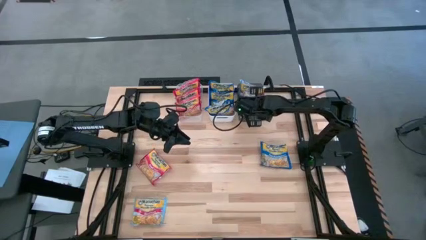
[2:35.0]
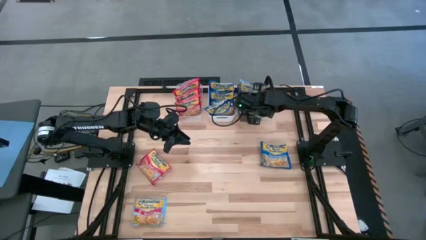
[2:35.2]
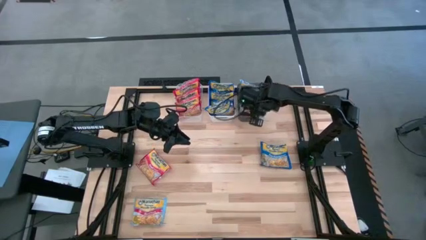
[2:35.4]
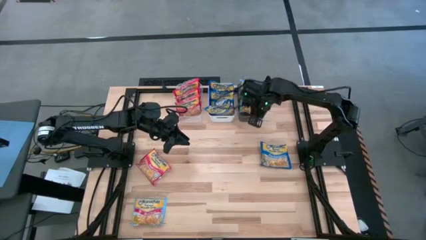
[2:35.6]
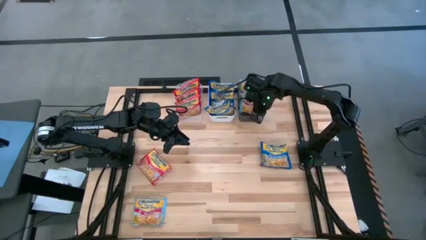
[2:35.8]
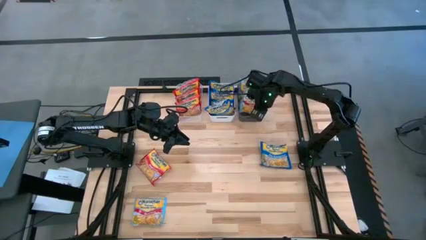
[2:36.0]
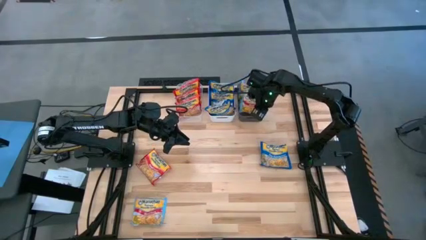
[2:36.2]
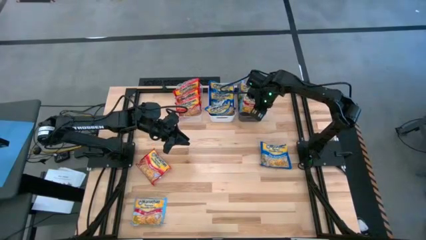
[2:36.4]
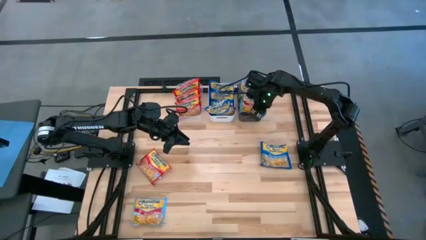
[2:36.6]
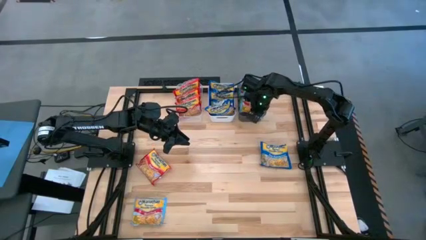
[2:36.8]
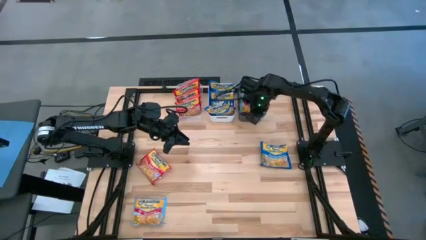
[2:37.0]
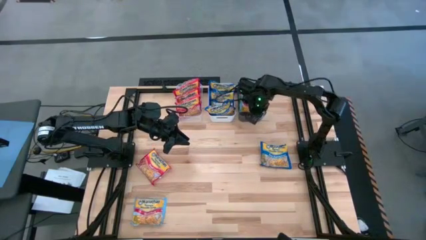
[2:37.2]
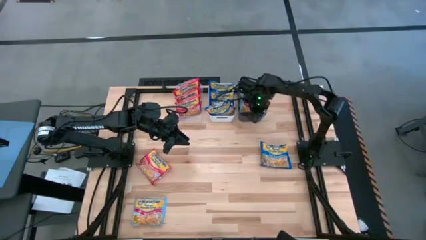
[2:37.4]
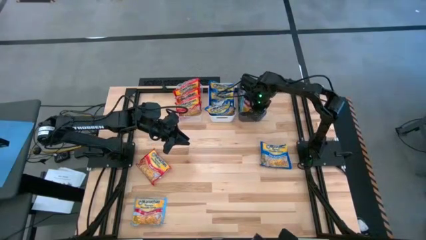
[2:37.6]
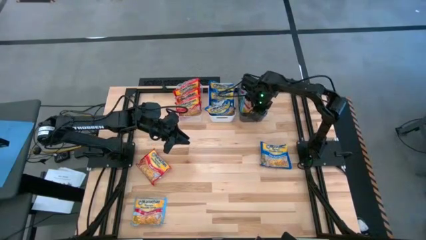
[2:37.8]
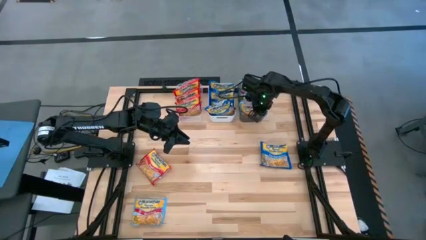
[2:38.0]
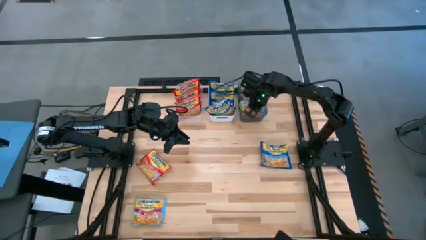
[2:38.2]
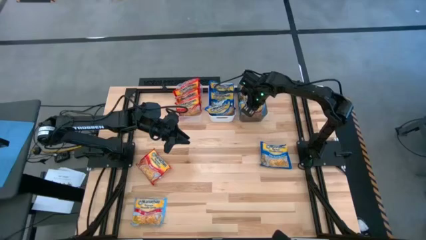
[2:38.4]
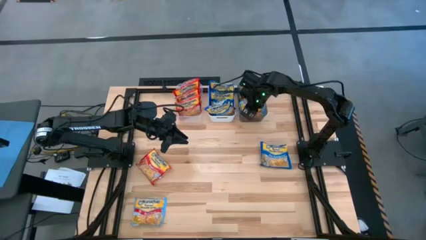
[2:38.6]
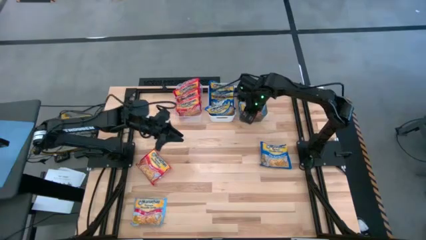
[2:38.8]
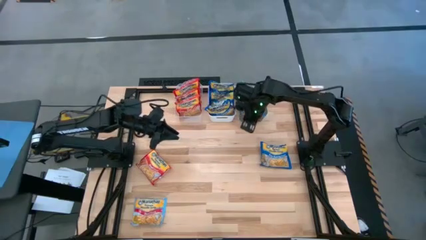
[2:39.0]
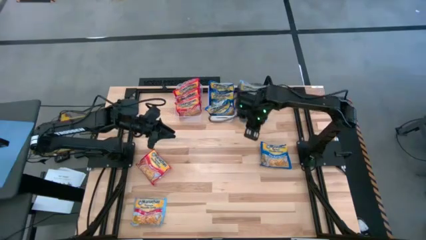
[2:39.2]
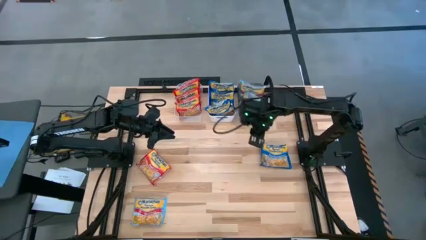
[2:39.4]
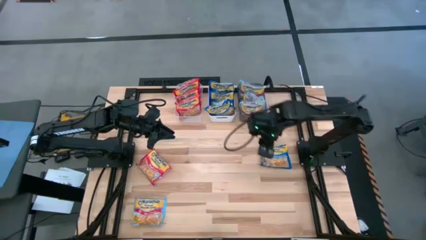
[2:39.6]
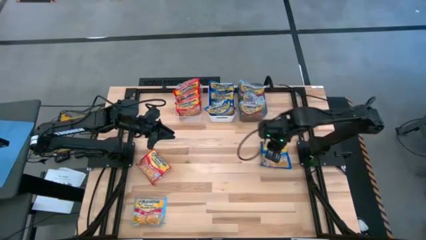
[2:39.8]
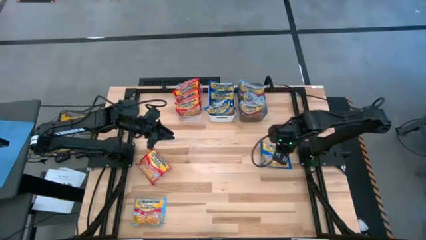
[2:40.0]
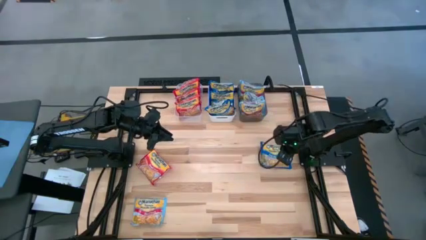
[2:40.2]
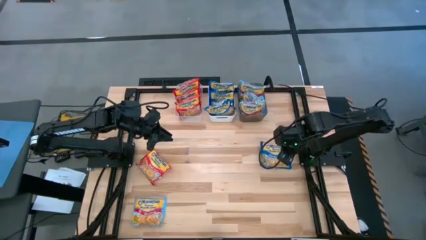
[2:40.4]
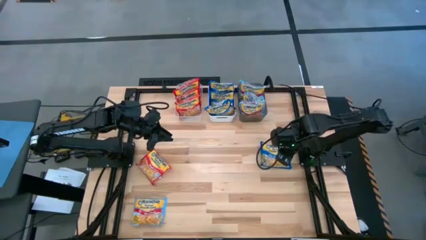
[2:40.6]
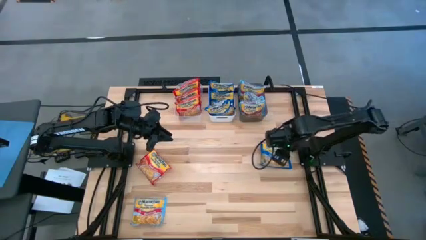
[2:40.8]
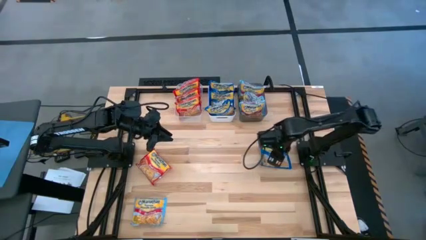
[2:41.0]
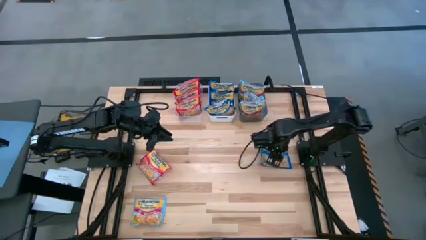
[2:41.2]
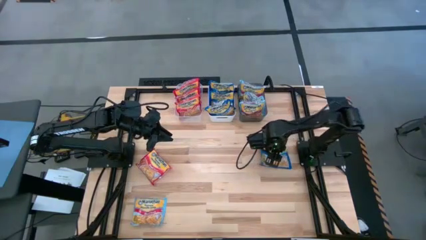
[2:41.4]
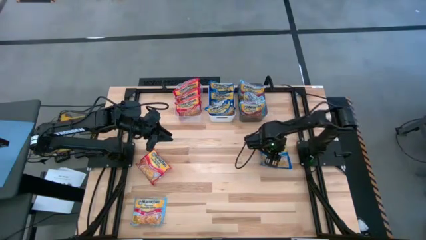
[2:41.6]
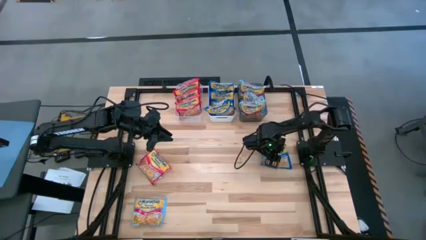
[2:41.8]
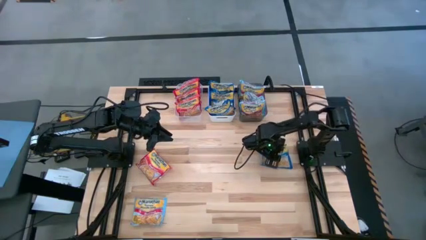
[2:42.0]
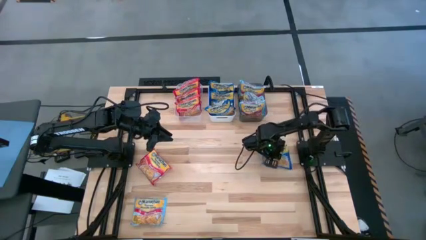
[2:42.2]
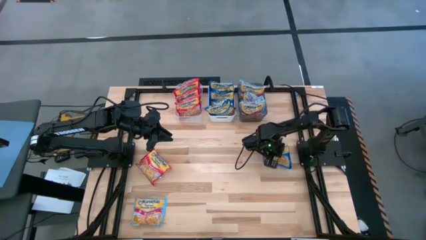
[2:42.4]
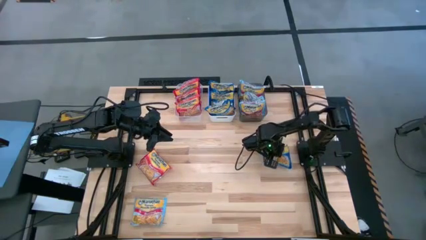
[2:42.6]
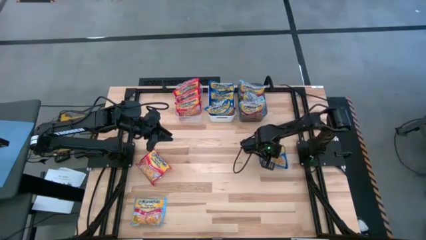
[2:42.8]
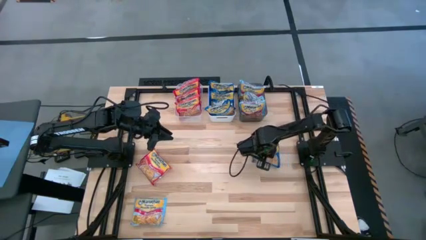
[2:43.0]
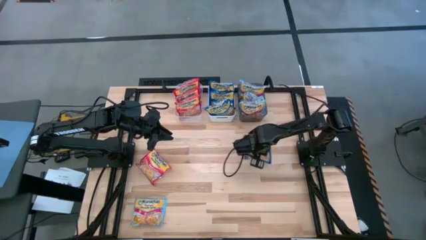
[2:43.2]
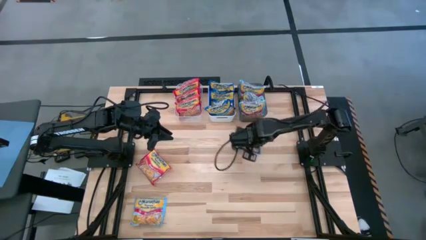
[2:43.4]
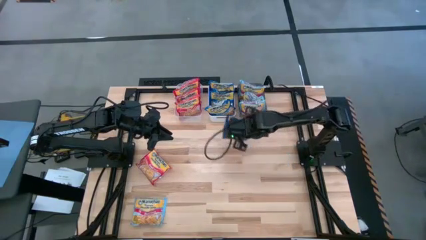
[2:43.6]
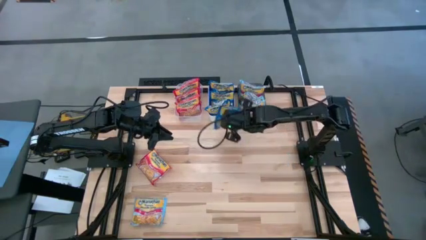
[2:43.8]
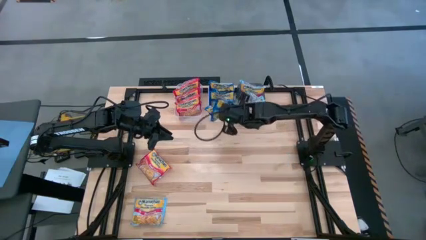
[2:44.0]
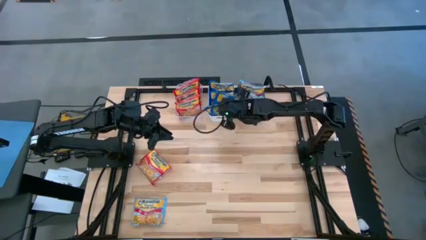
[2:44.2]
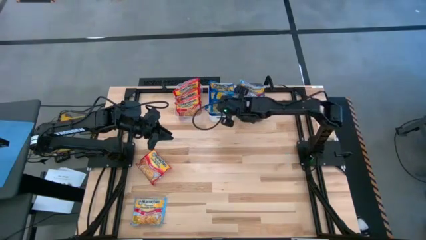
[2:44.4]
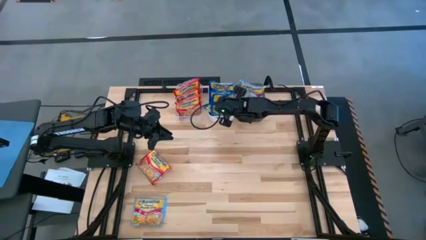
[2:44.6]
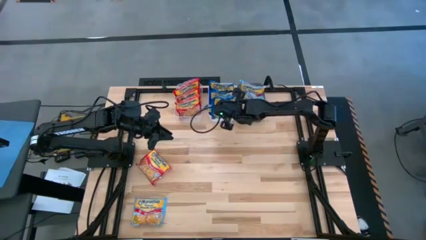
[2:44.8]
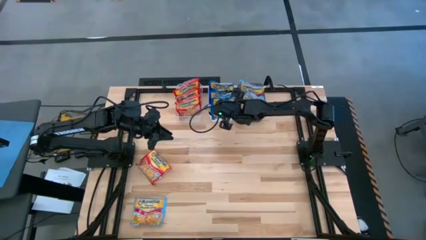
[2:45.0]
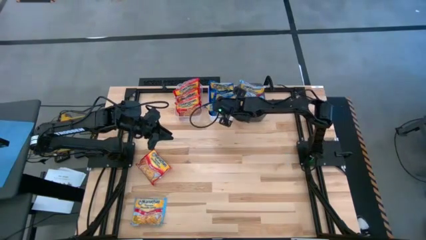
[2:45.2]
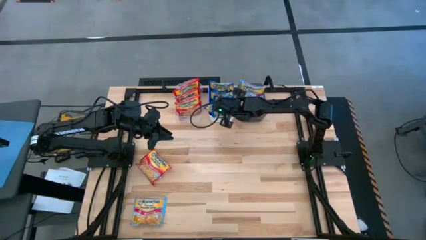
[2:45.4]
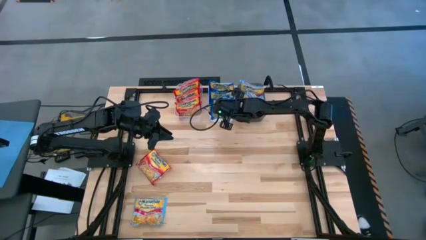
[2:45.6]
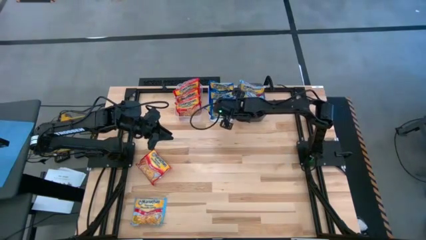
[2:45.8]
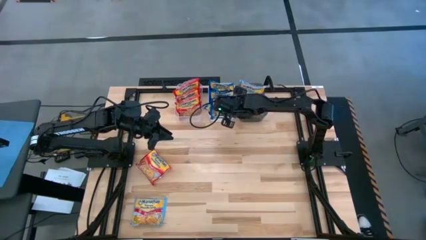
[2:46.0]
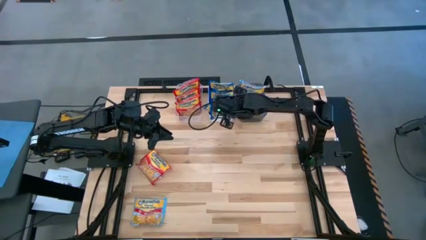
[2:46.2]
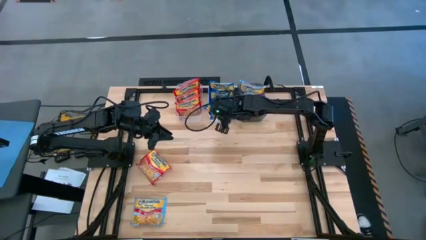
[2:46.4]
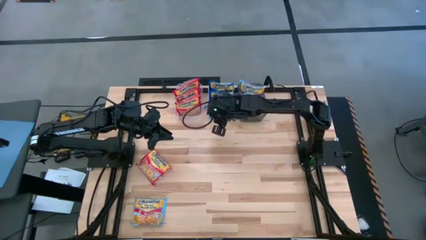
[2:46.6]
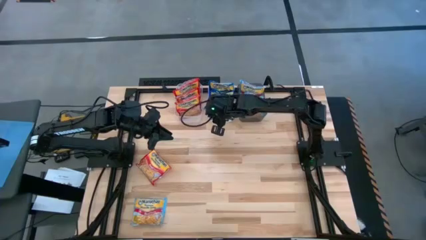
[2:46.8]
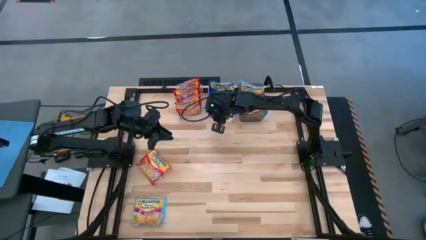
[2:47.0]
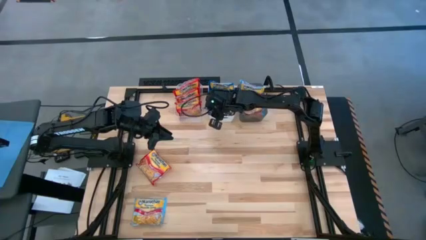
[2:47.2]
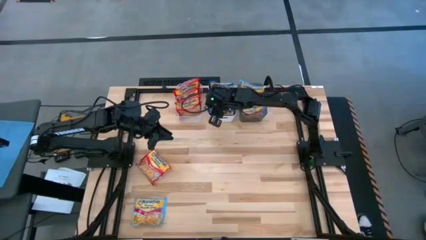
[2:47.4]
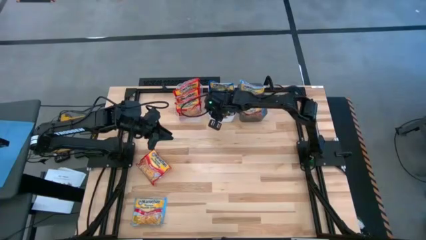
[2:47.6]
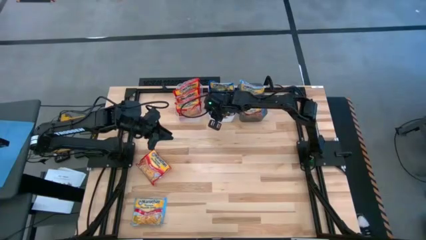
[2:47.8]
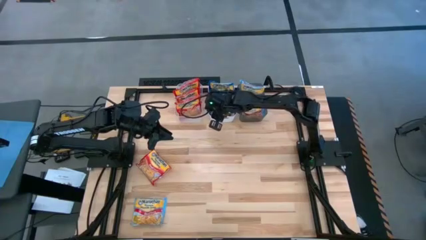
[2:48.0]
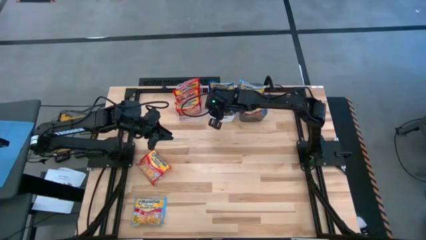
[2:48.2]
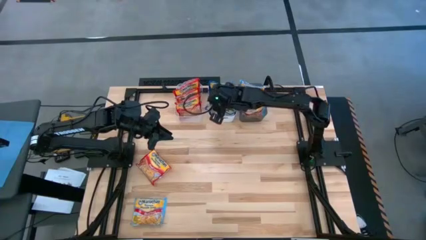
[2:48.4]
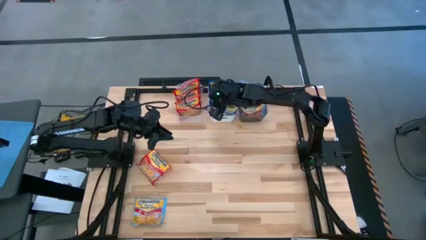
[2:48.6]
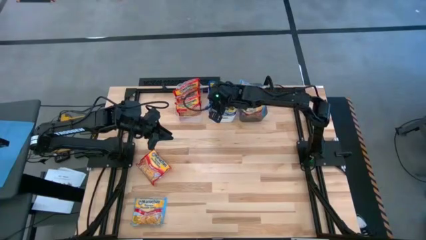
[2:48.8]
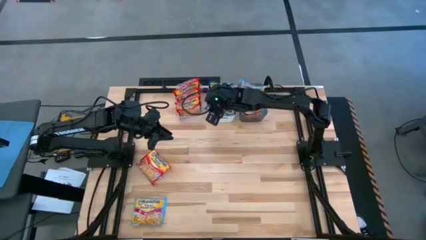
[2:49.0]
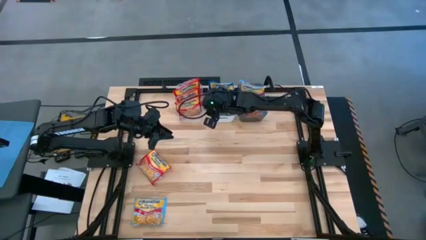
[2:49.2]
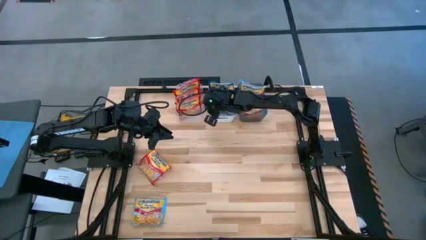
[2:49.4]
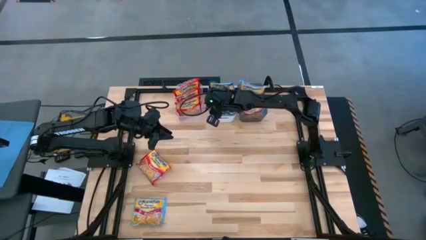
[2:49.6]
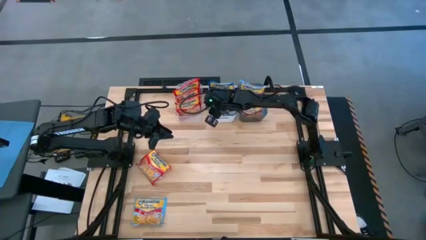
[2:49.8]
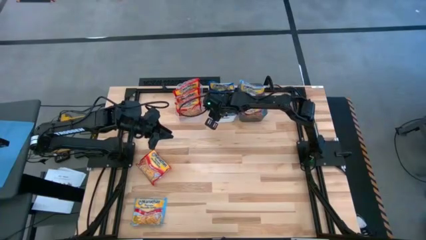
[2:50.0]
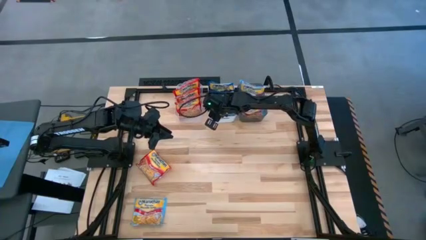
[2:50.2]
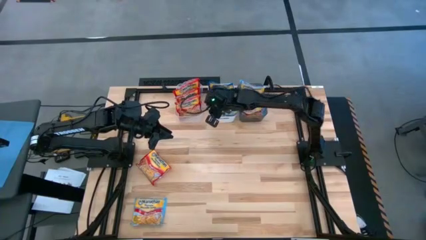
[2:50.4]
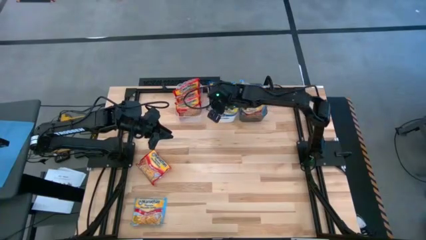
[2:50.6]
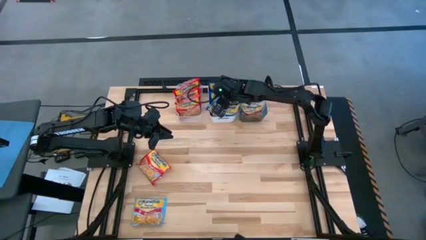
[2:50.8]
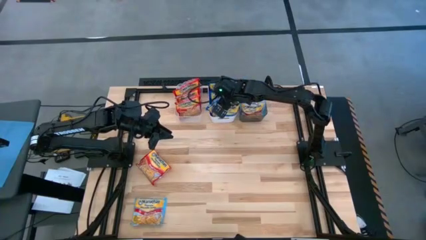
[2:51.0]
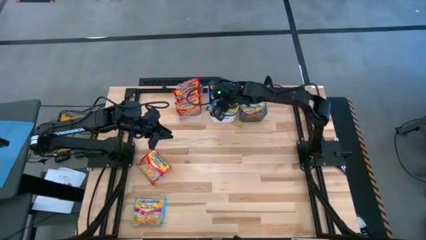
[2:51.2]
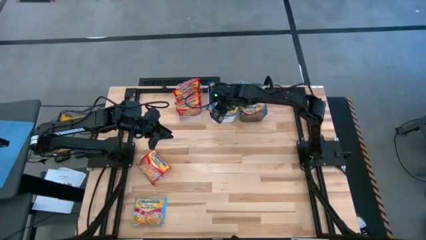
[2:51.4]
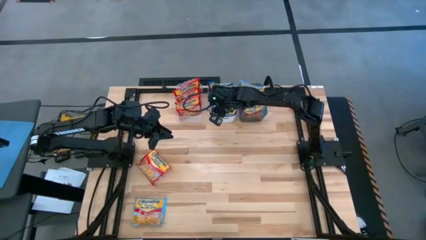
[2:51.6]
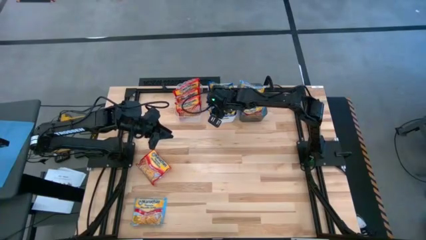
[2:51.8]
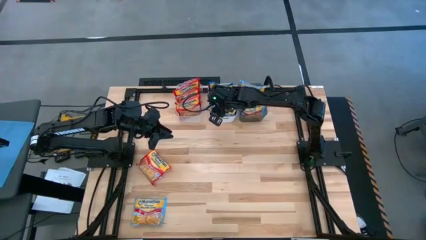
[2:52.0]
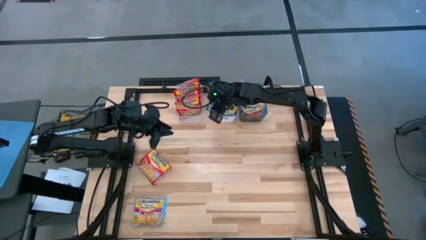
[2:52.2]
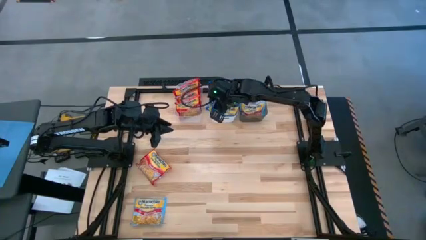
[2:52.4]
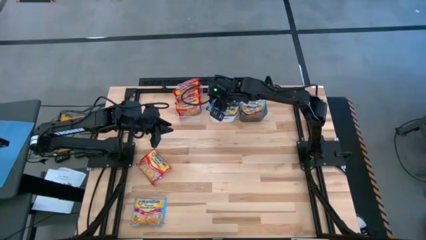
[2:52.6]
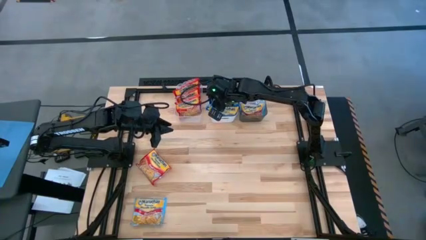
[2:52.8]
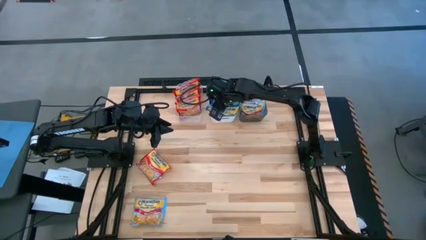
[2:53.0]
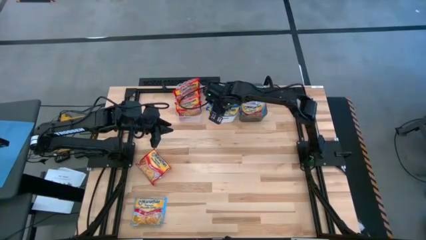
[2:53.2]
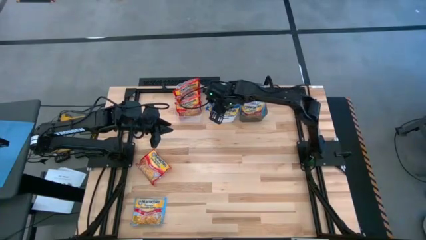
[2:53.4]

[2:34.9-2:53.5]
Task: Sort Maruchan noodles
Put the blue noodle pack into the white bin
